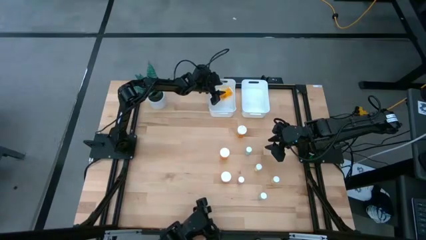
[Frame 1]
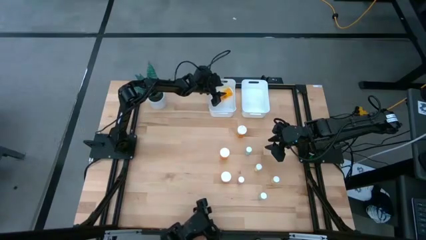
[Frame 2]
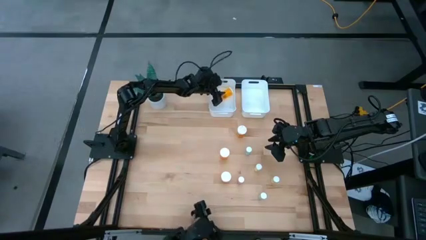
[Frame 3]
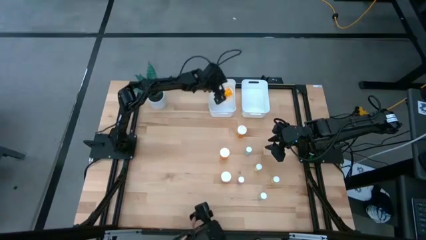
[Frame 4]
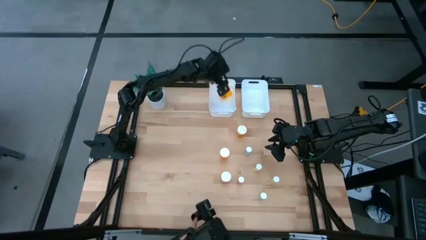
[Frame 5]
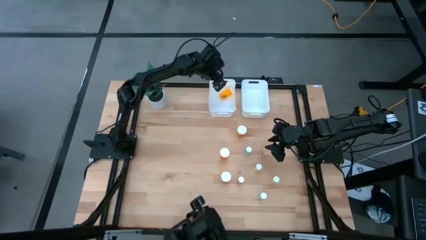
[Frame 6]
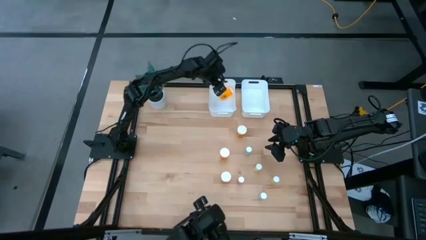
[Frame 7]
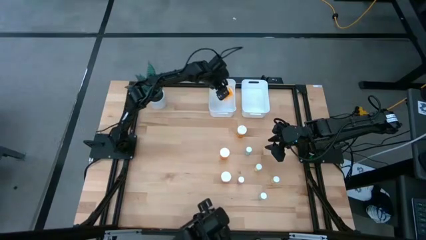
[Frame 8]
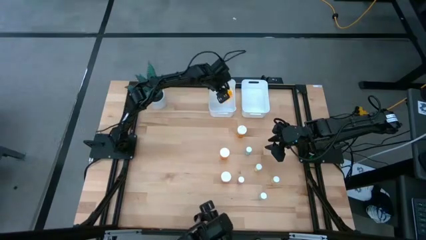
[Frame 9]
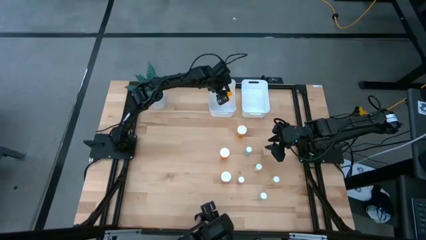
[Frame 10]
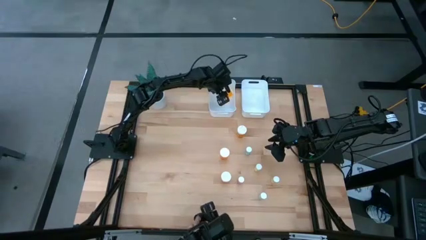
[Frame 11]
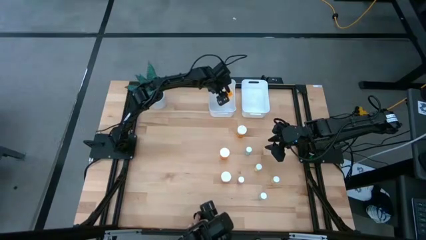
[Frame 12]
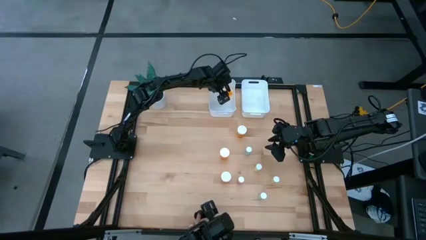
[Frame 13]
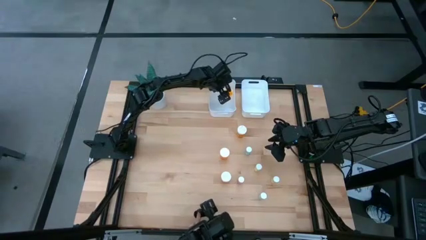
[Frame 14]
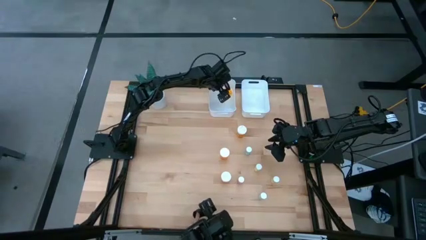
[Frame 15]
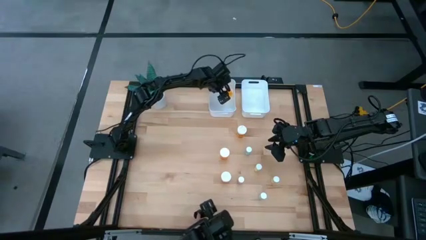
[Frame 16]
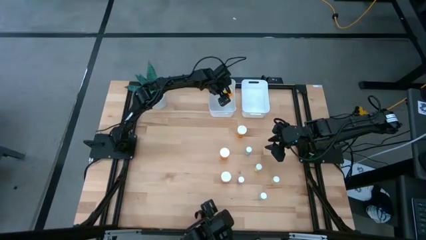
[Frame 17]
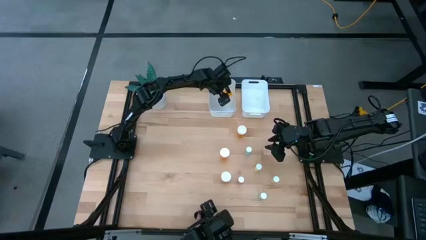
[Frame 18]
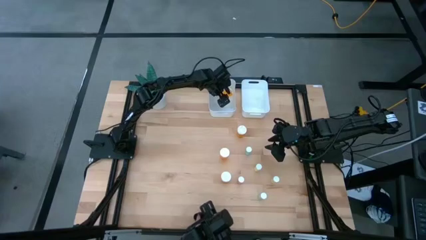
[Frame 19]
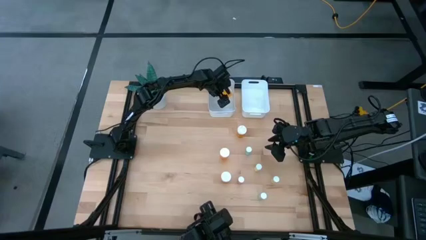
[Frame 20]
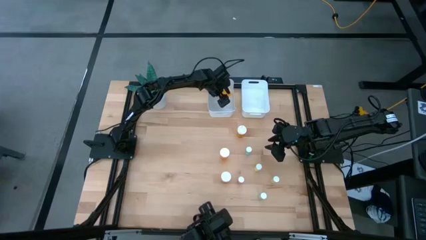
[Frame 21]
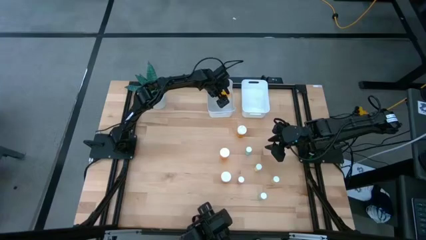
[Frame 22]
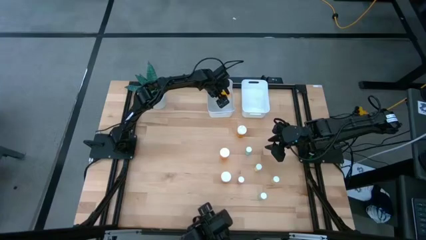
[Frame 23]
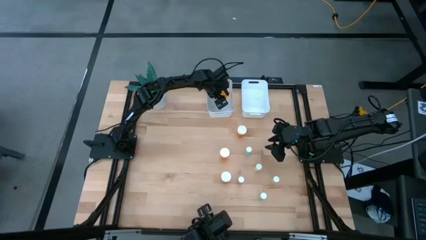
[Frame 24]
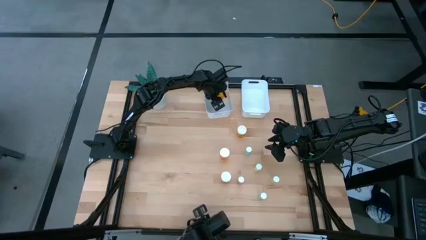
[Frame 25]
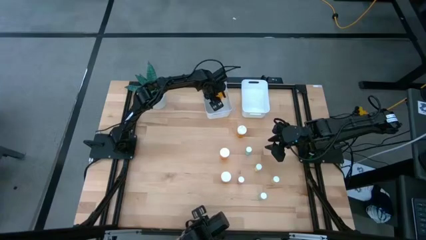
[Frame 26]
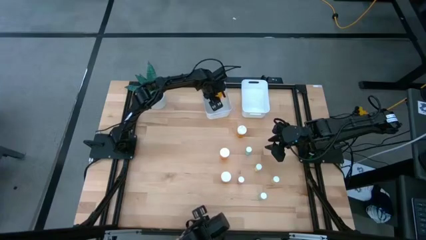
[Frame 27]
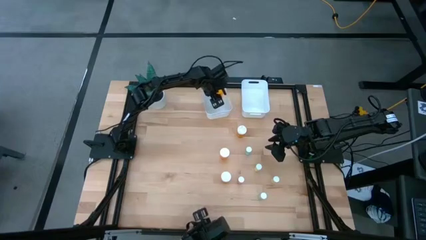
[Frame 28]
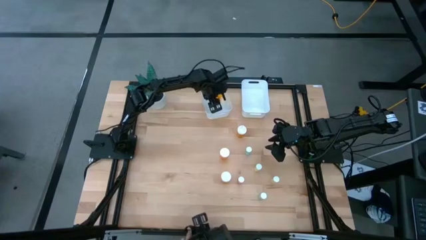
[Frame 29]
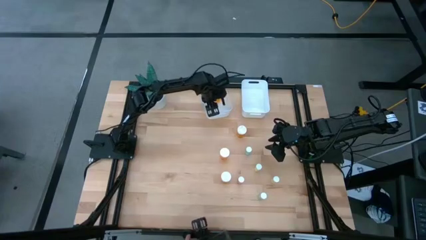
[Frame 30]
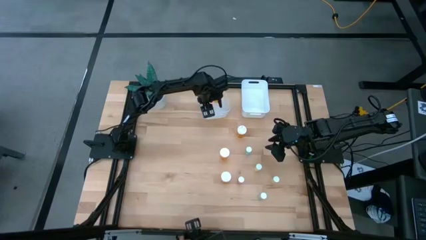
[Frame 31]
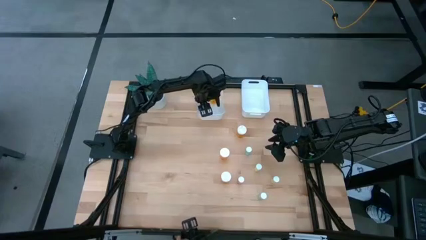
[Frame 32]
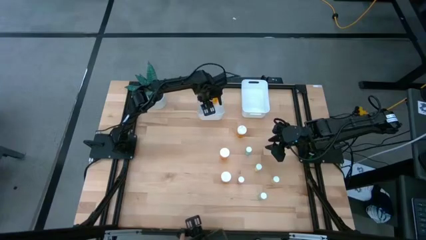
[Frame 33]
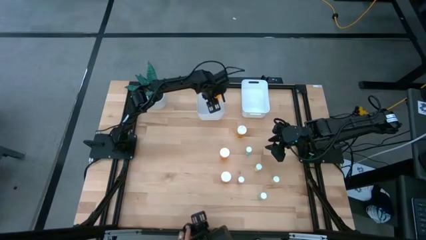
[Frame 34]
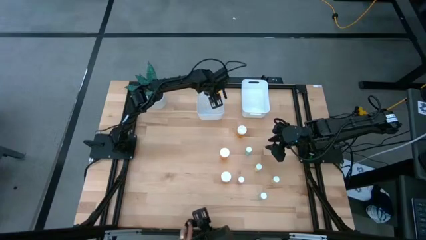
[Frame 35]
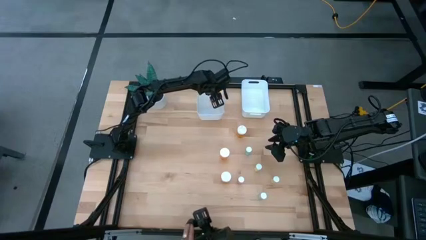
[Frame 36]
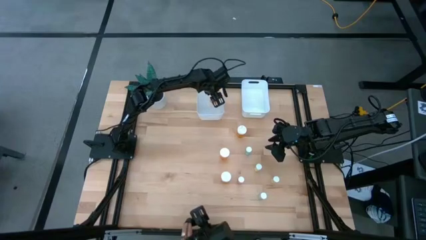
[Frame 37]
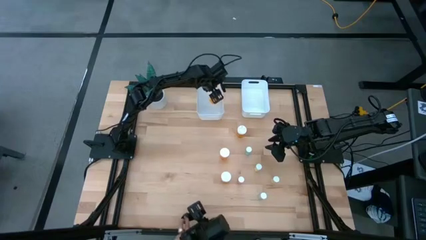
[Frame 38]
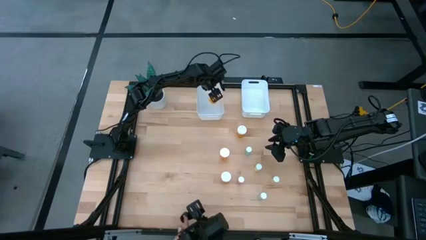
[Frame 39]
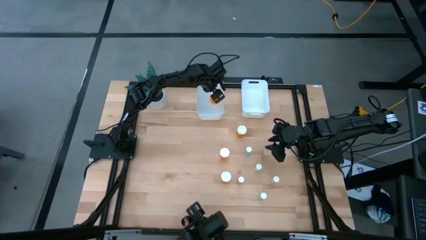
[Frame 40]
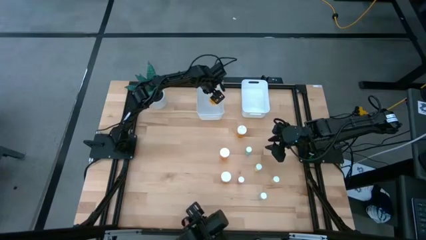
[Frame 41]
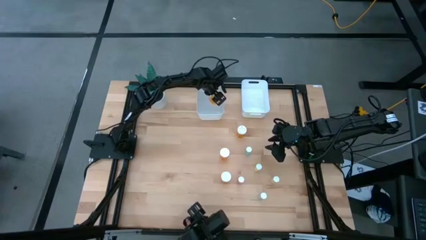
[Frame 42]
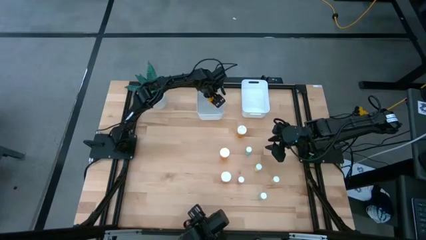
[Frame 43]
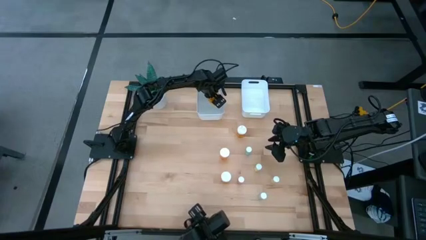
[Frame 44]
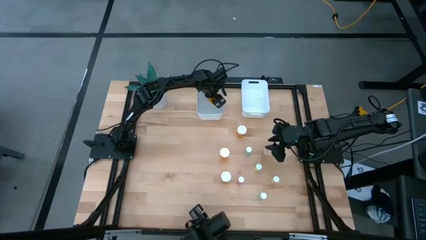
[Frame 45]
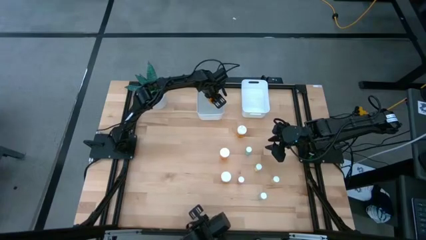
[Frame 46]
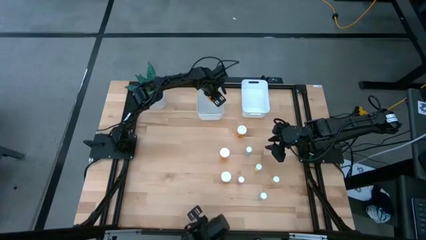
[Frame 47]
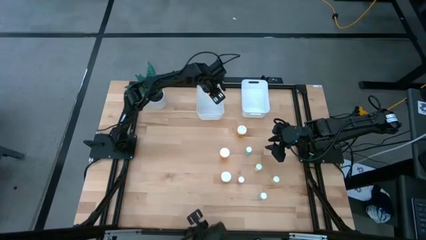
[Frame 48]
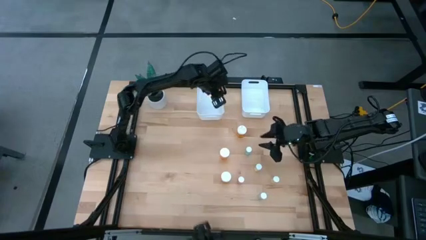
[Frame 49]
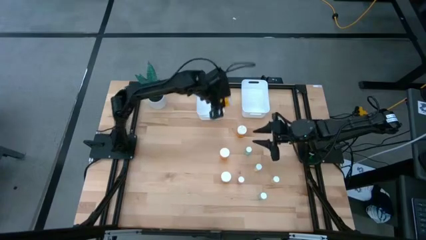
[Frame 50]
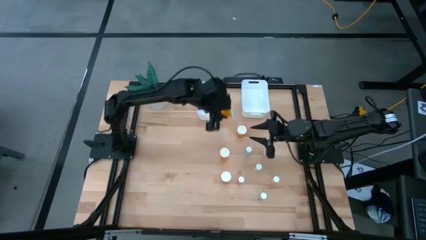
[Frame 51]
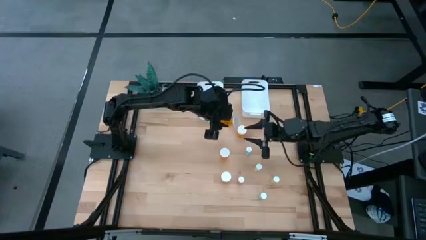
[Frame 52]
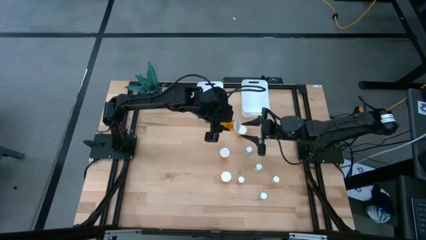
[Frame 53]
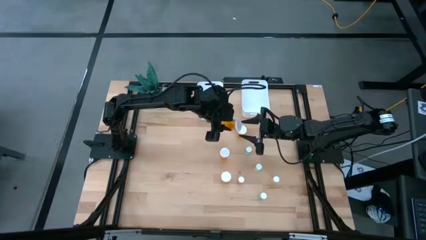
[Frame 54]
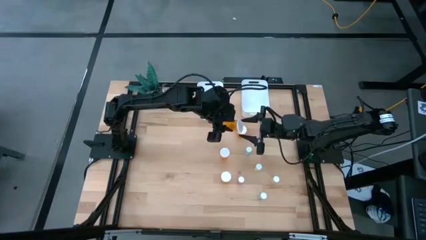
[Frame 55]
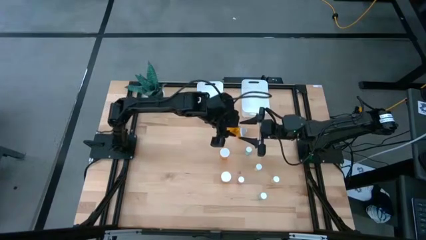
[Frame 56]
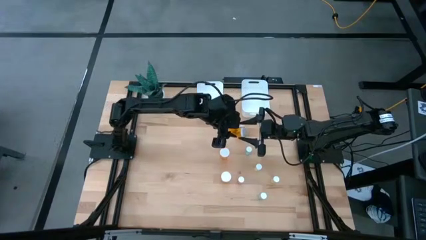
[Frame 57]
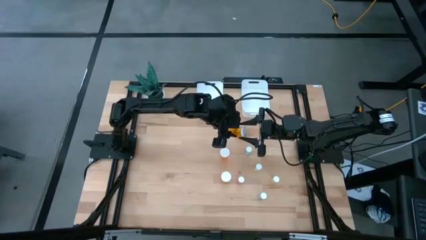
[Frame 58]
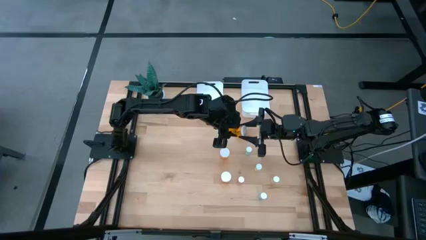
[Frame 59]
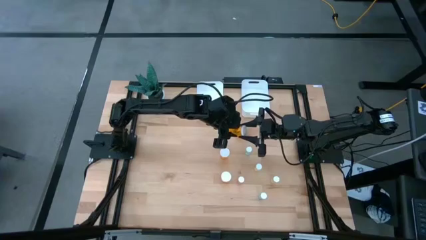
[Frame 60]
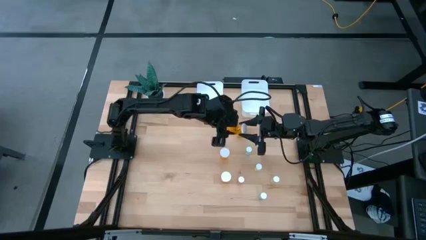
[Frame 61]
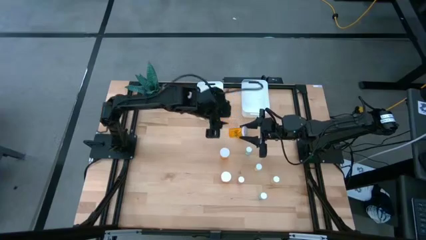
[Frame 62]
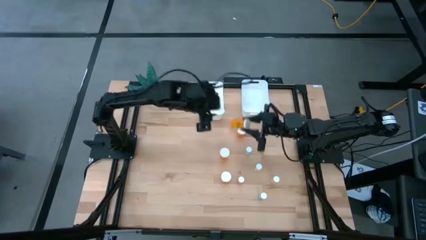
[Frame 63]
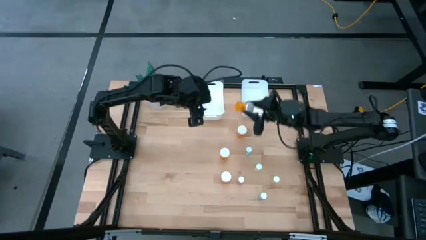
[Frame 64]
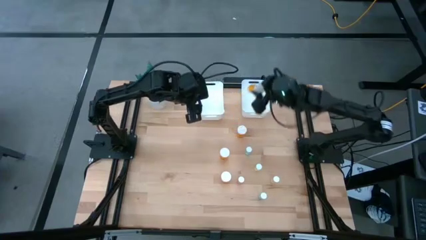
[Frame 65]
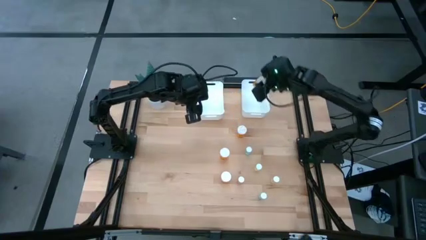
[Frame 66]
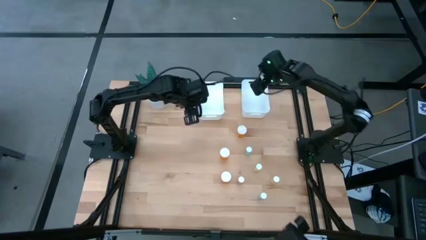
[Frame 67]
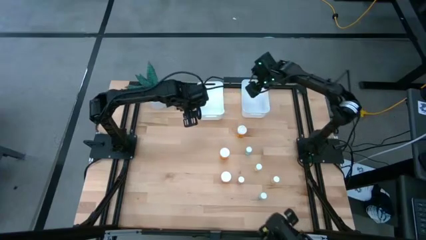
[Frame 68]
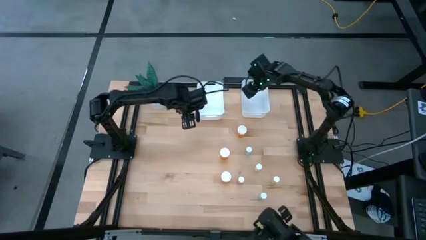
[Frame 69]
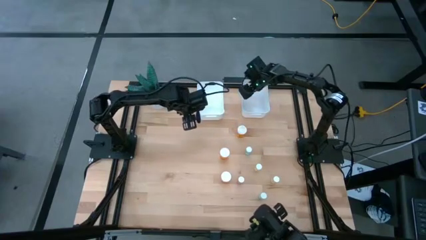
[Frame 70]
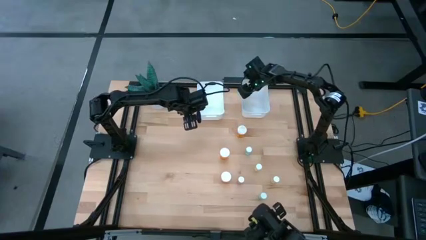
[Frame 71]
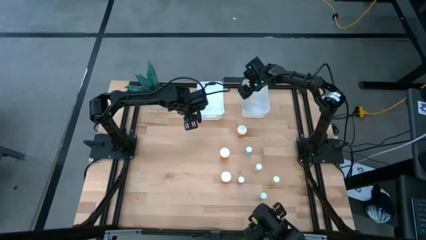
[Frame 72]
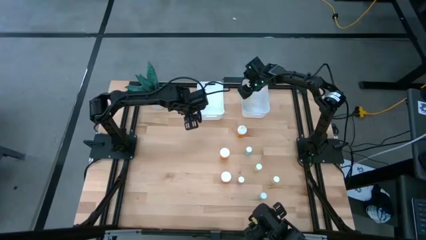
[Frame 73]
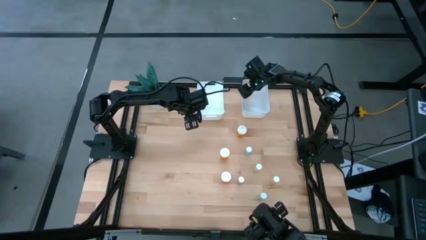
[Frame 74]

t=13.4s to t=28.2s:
Task: Pick and place medicine bottles into bin by pill shape (circle, oval)
Put the big orange capsule bottle into the right white bin
